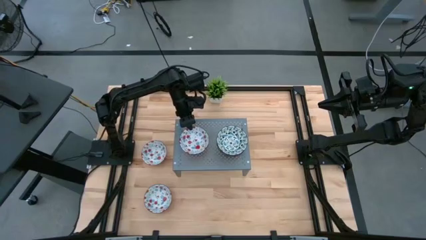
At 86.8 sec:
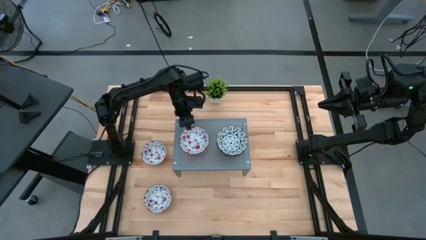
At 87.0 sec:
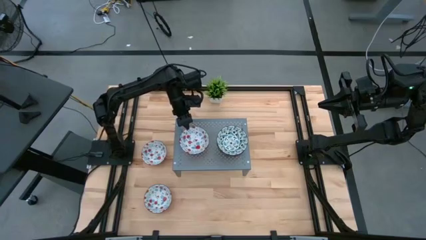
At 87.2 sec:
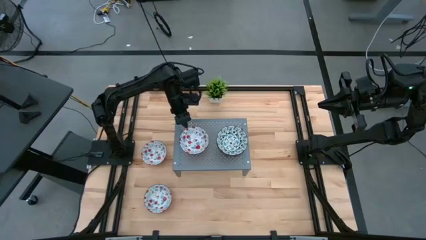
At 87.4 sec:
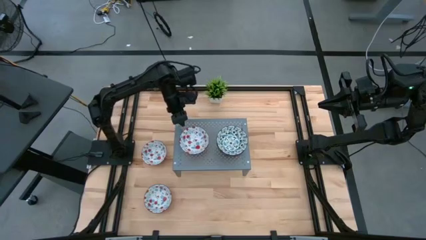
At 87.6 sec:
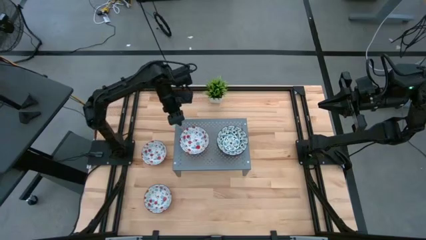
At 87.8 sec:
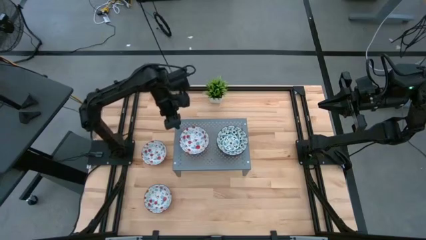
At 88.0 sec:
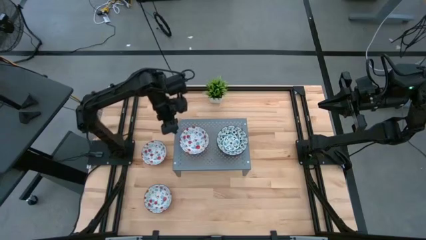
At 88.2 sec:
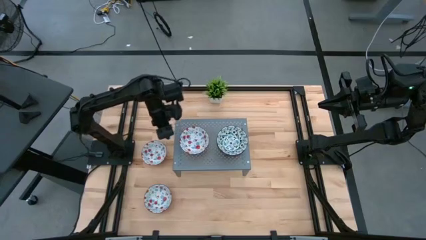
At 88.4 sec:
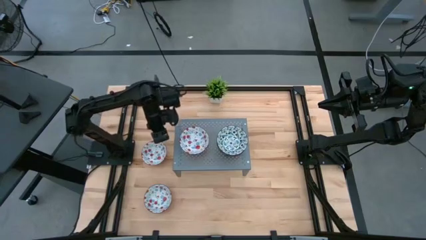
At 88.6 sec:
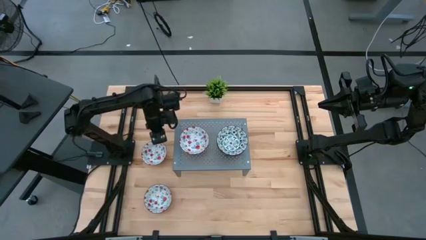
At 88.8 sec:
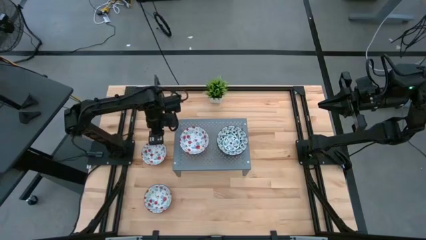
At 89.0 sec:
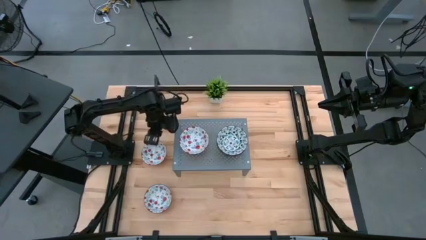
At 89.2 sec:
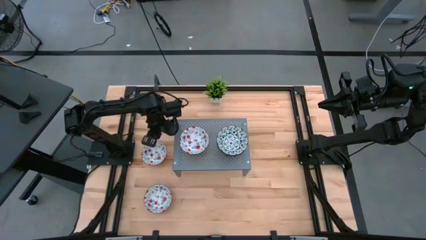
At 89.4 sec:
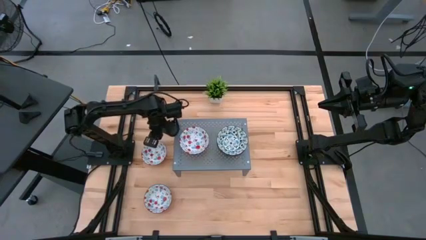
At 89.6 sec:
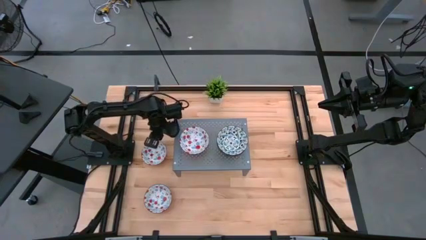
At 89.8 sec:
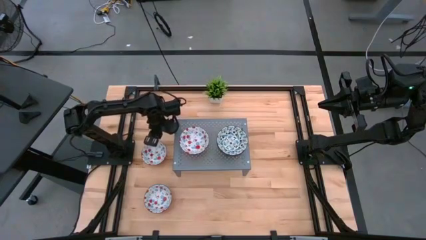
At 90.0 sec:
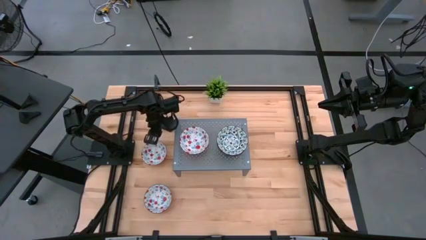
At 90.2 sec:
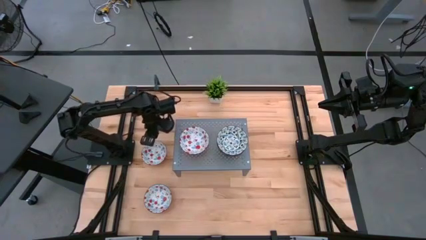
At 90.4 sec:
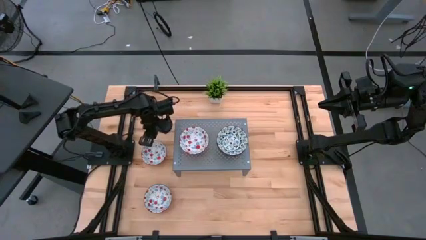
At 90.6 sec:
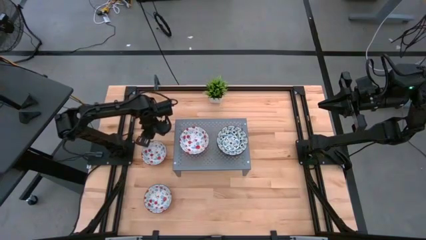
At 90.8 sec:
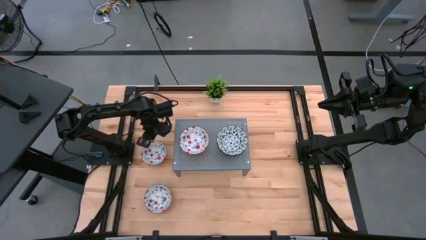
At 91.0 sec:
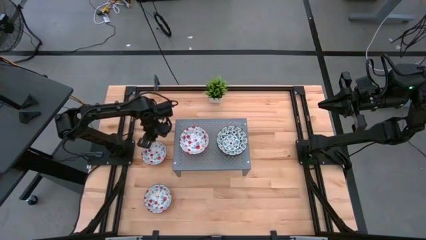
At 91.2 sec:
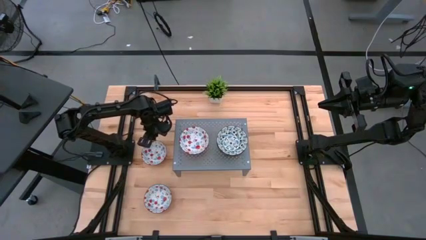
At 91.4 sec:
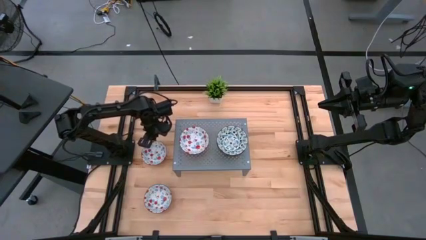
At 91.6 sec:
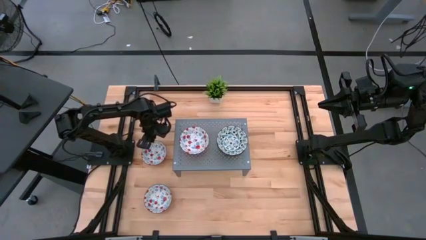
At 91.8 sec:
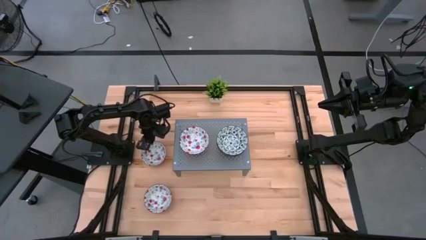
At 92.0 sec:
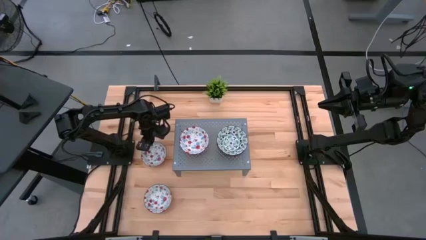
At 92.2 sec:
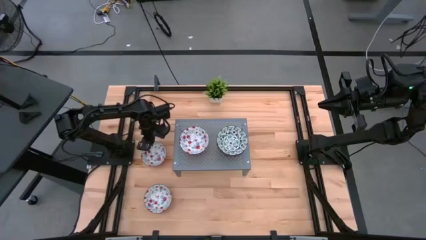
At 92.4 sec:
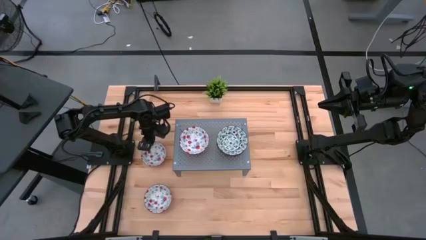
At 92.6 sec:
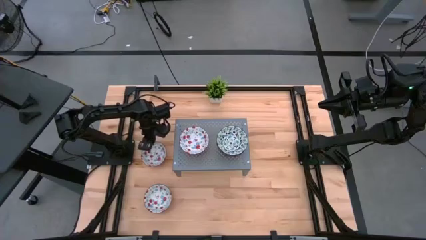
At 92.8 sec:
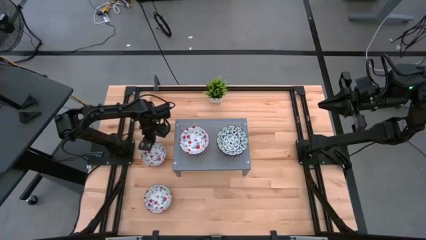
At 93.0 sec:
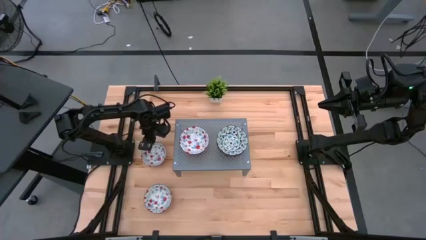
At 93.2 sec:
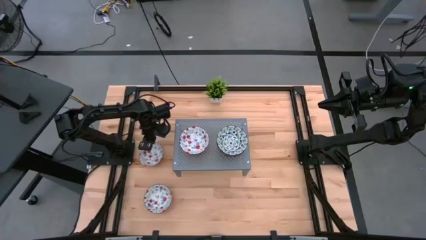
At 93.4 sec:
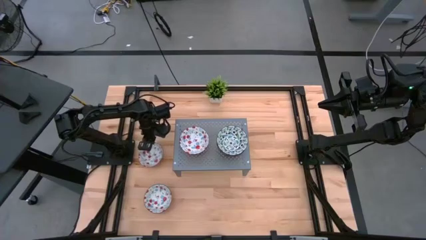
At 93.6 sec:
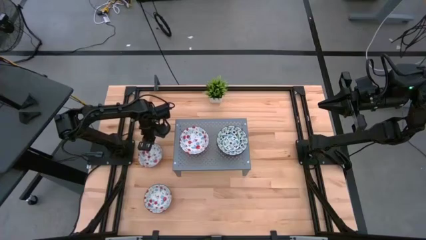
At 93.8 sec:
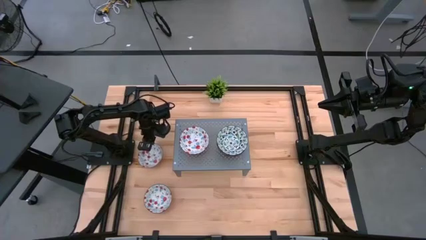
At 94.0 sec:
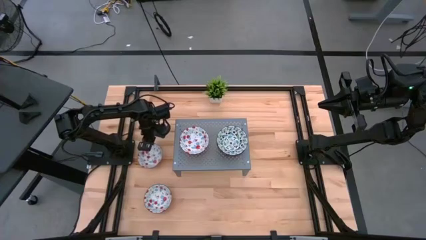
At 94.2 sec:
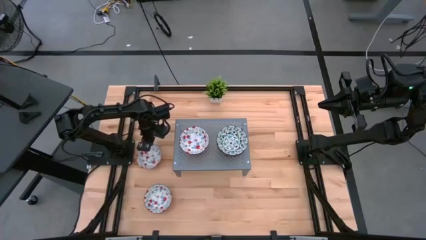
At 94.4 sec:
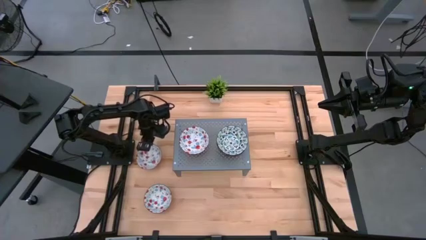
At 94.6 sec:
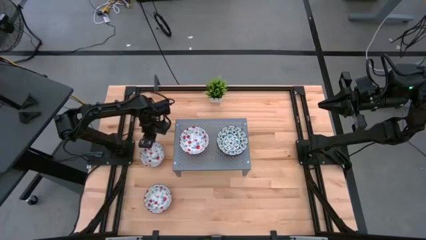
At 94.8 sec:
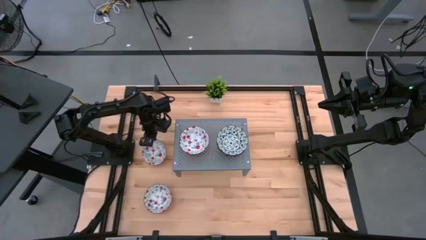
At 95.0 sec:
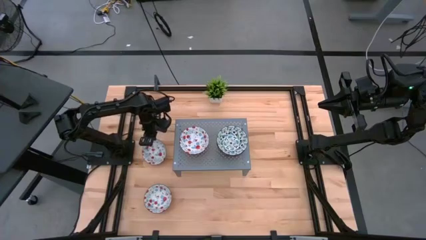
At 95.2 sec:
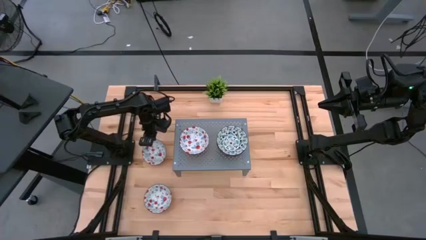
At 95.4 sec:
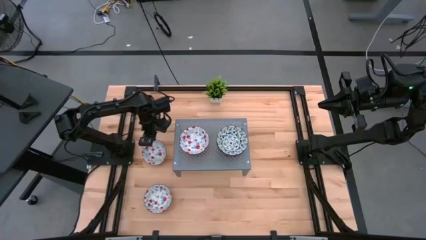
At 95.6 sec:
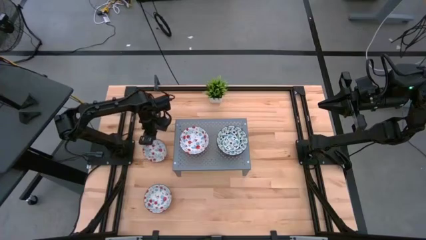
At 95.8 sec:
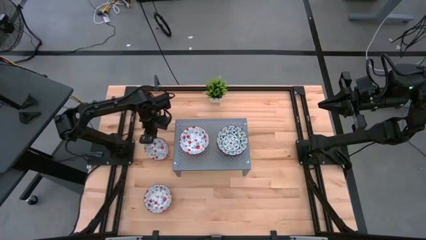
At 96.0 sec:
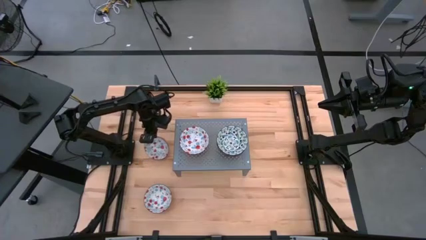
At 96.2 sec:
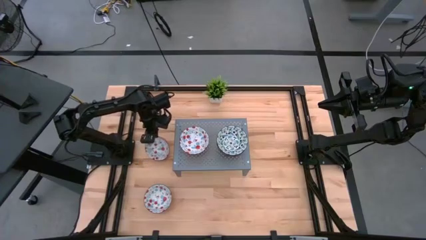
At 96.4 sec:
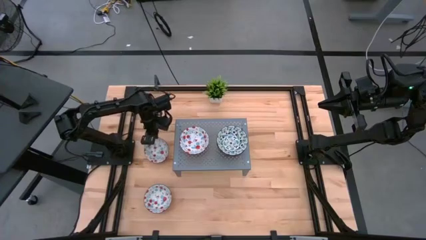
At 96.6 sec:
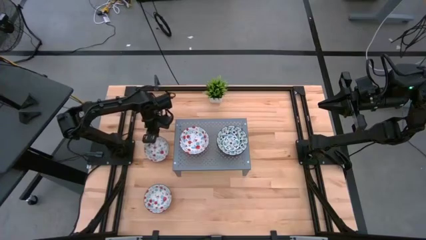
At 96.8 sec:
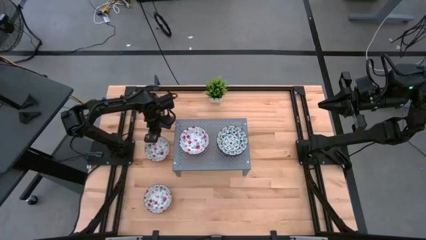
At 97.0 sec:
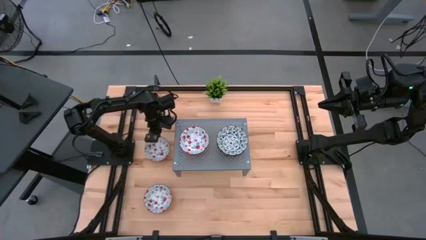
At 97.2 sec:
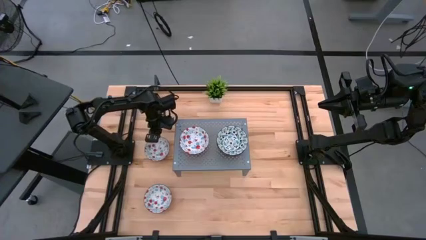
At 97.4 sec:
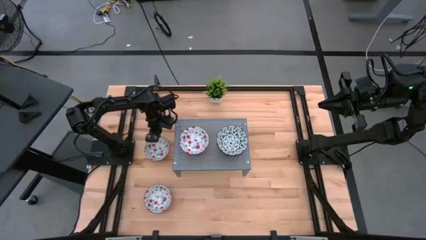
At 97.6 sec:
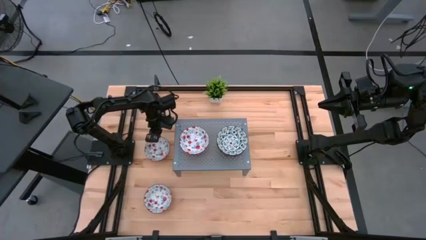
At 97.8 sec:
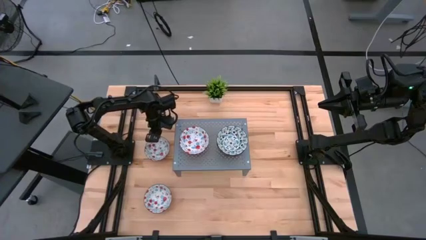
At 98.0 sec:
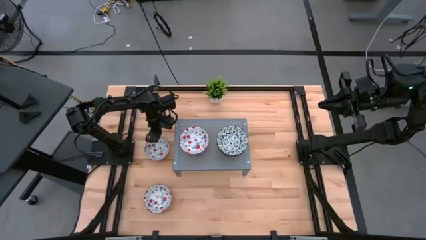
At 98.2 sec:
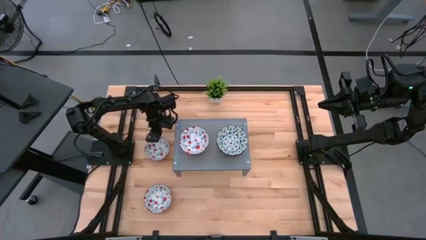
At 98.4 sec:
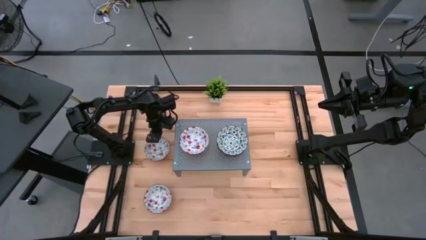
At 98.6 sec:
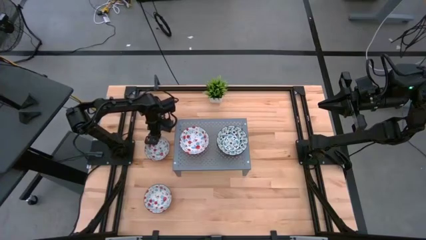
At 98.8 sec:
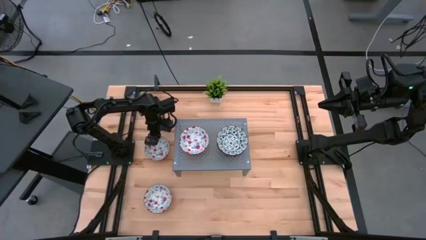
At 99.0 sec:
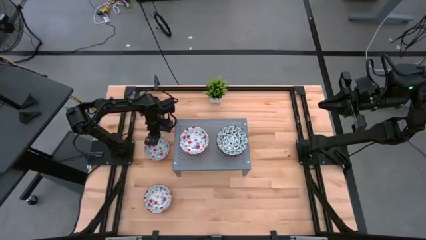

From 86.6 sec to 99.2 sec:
Task: Pick & Place Mini bowls
Stack the top red patterned bowl on the other red patterned bowl on the shelf

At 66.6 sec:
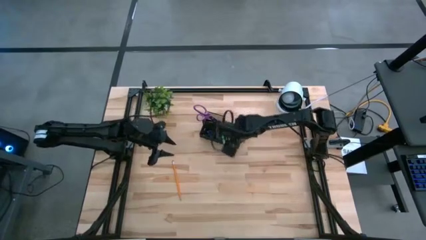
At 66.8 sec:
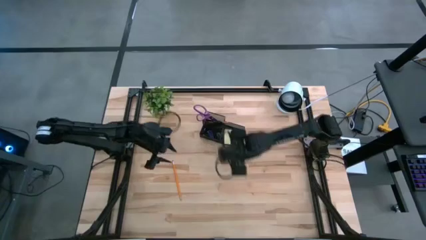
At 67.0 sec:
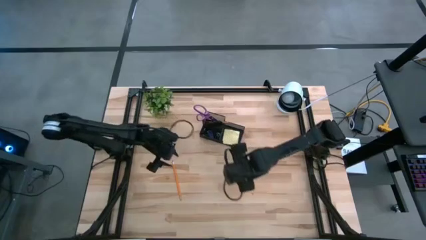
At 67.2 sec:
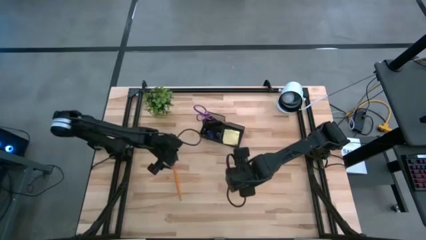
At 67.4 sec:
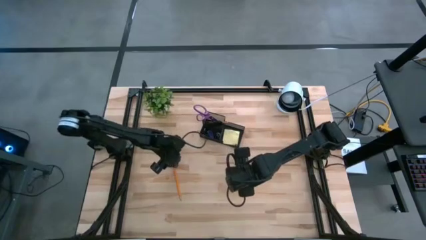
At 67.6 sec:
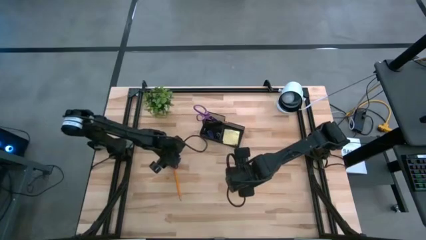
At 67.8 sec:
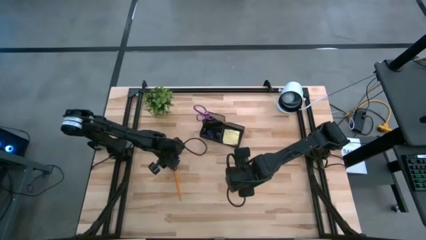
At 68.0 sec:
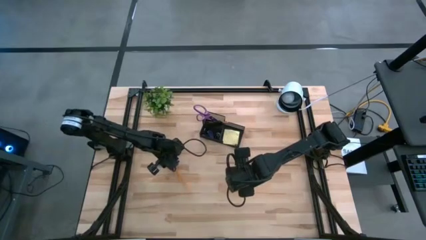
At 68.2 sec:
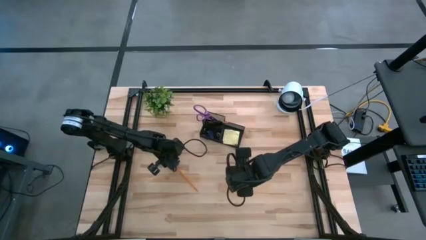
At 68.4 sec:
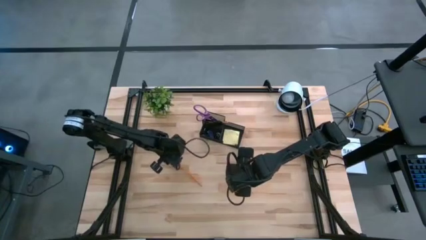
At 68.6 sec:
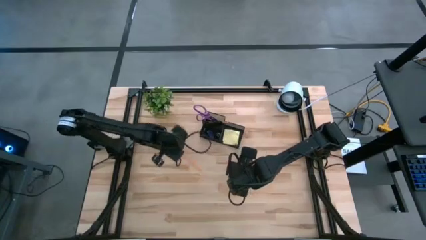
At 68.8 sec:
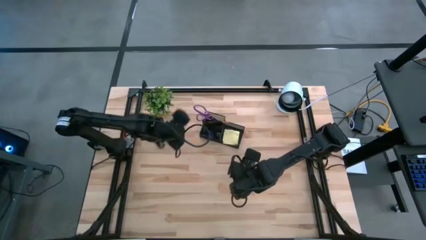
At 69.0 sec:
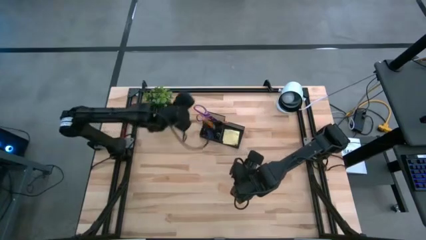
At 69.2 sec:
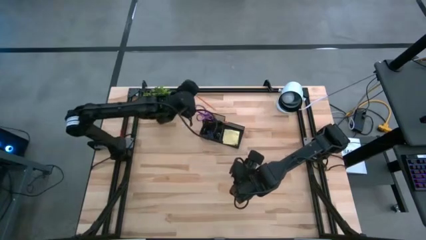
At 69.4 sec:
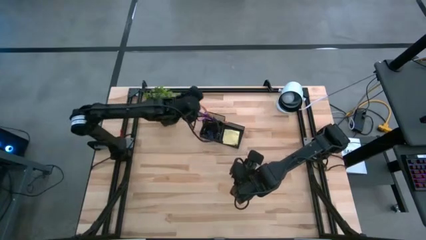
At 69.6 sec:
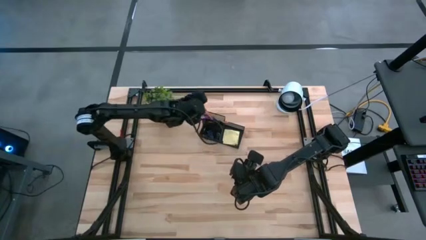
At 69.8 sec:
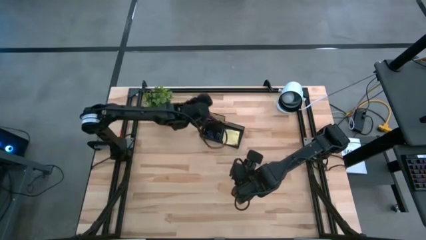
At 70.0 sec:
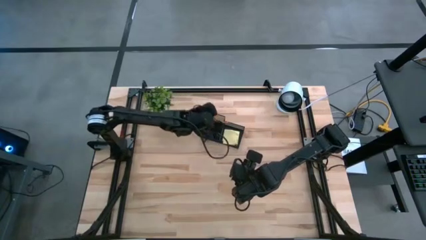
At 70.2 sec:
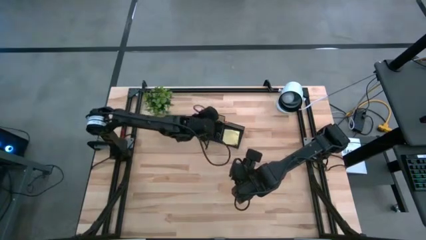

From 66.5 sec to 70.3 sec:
Task: Pick and place office supplies into organizer
Put the orange pencil into the black desk organizer
